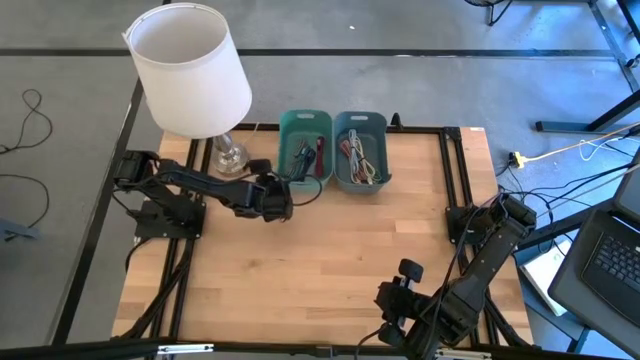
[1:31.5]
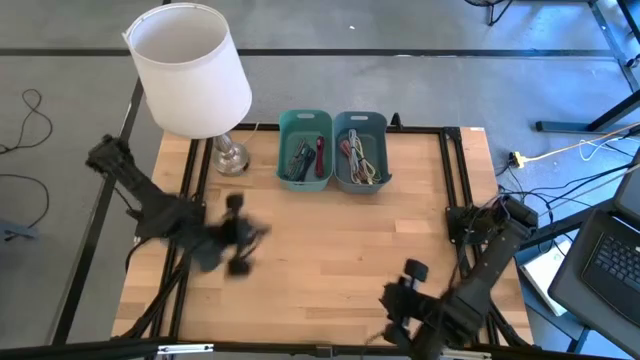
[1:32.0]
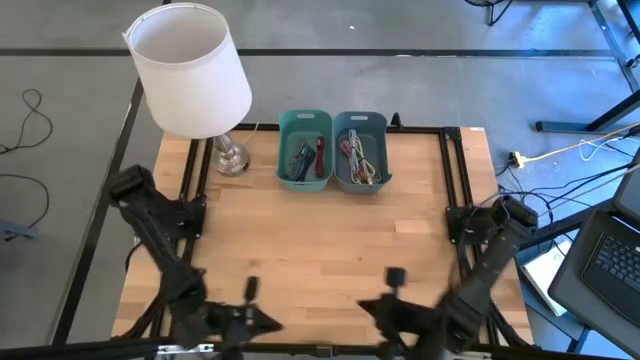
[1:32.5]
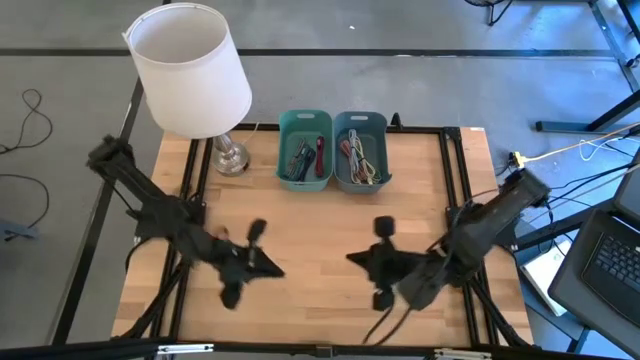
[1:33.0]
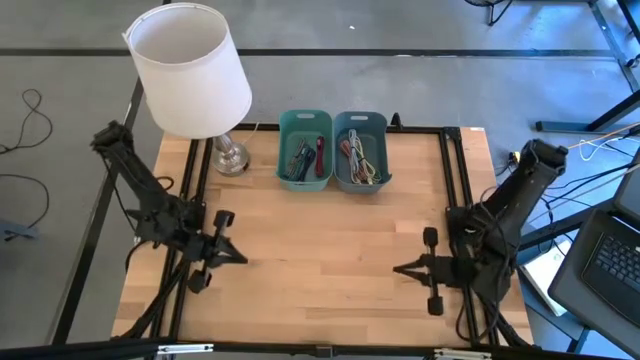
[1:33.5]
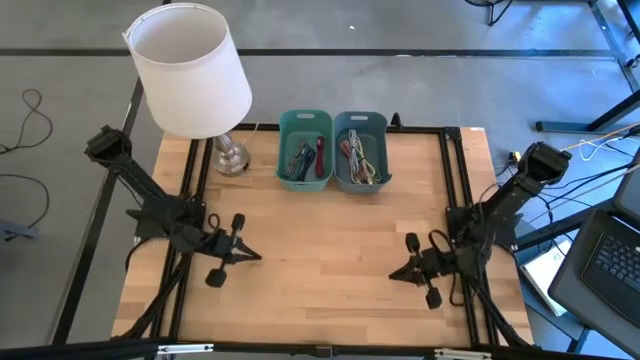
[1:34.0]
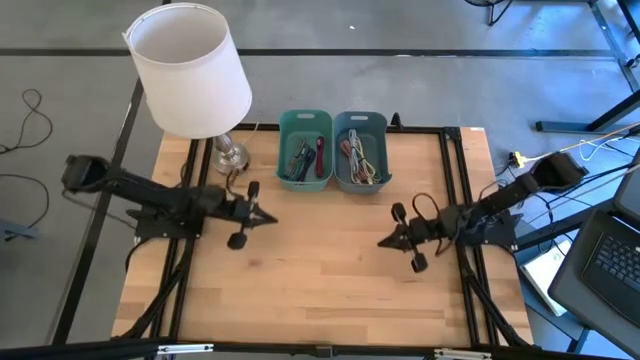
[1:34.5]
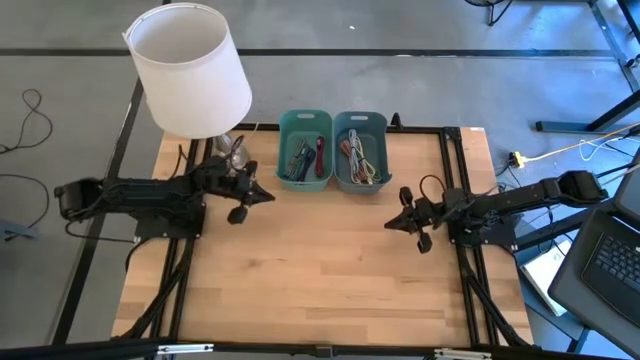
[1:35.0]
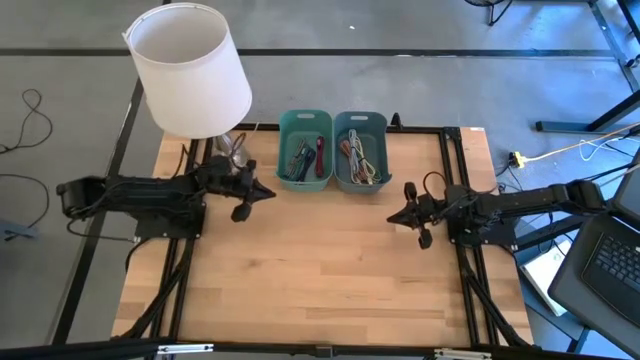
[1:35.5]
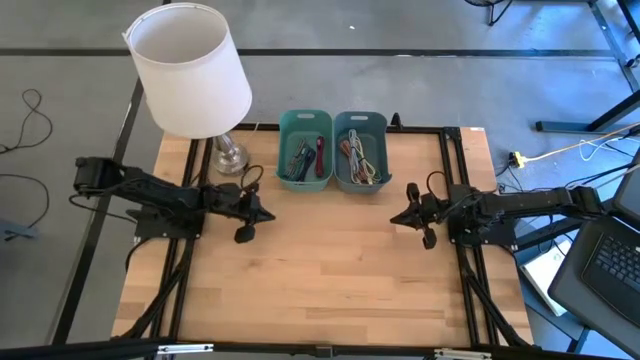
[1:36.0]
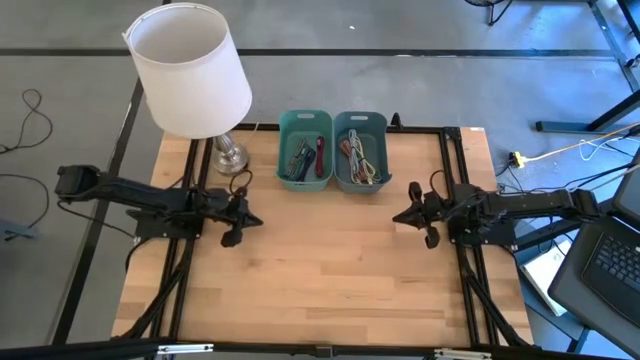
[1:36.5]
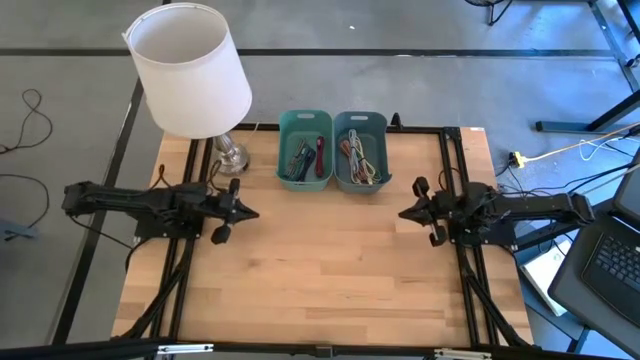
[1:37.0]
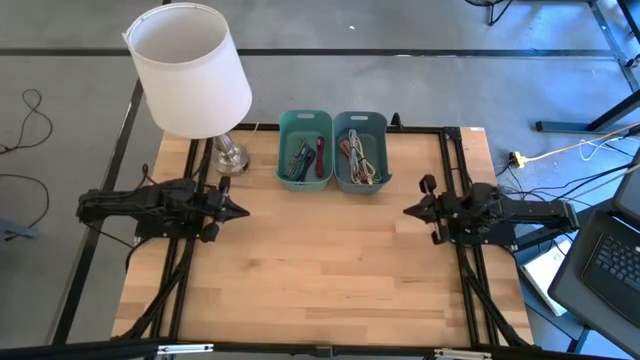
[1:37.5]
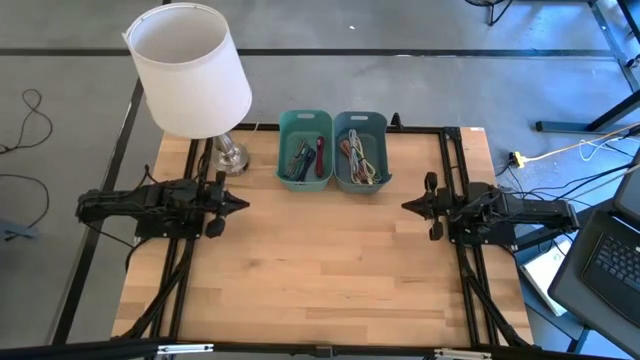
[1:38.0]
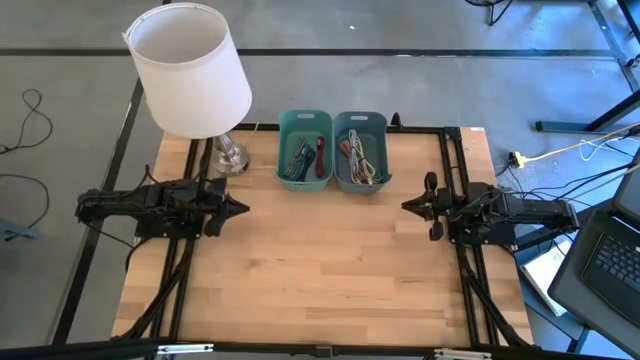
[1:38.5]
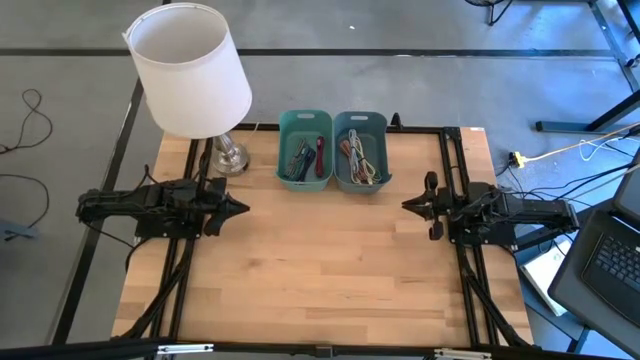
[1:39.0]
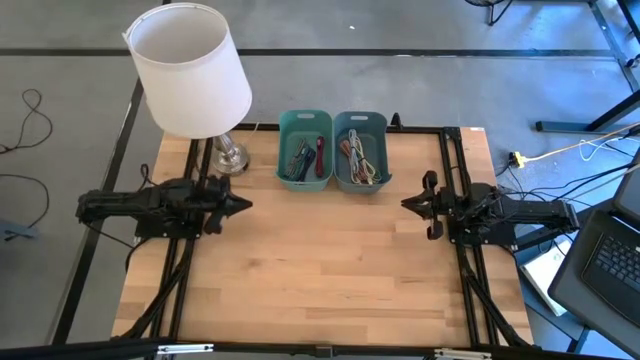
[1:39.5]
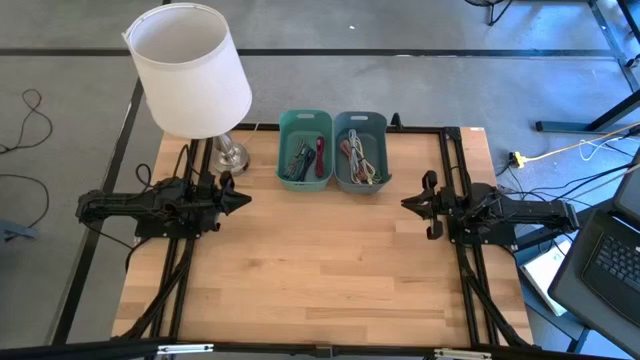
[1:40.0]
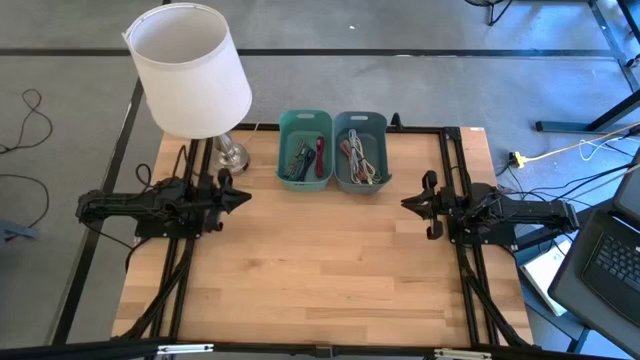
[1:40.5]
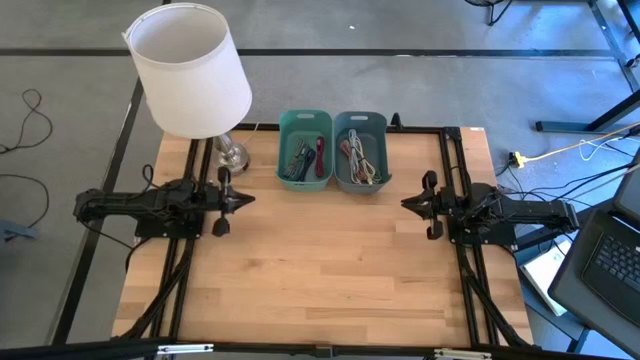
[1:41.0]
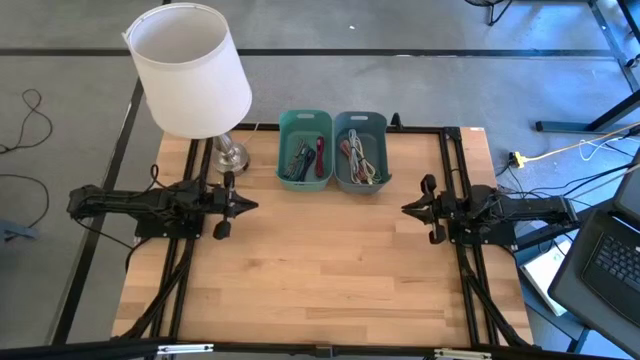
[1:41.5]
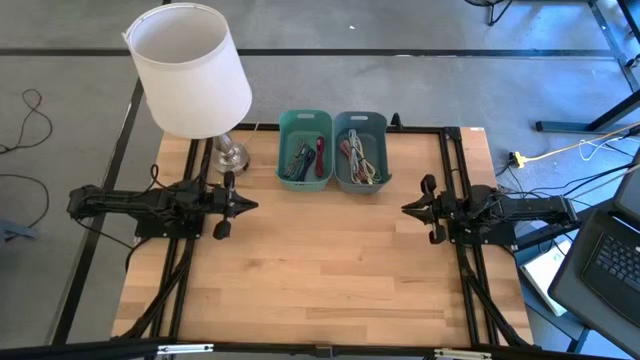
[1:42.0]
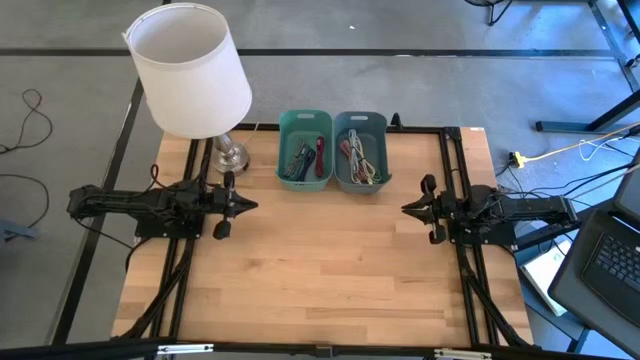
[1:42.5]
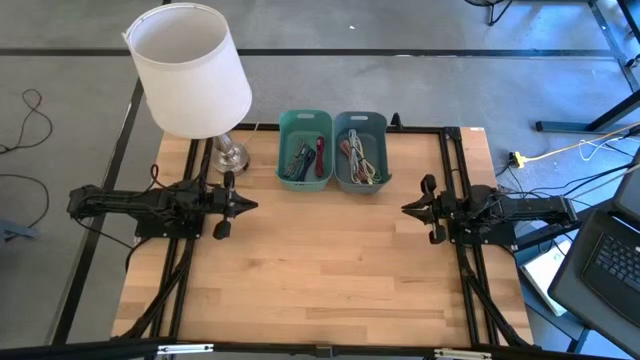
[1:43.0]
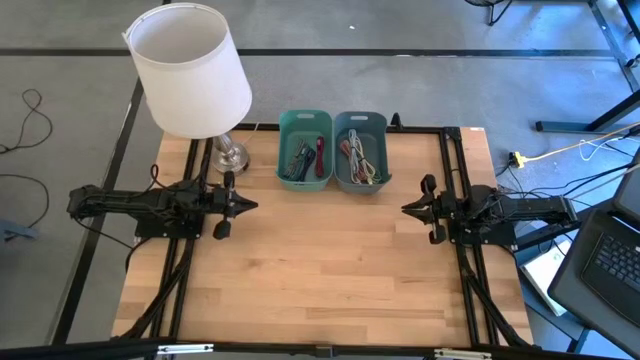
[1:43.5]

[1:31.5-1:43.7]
Return to Home Position
